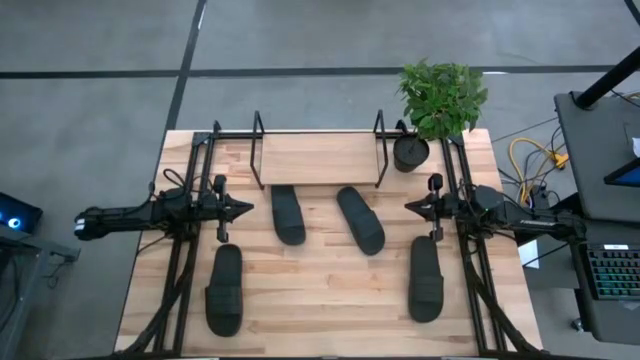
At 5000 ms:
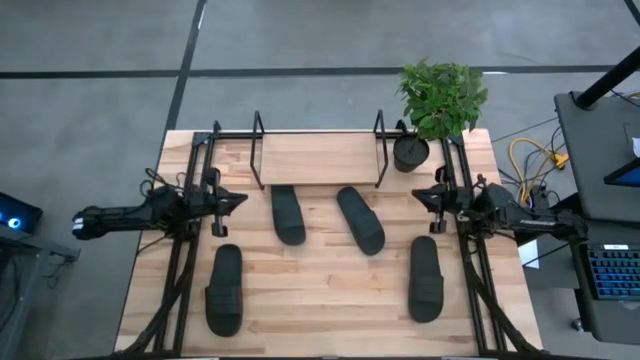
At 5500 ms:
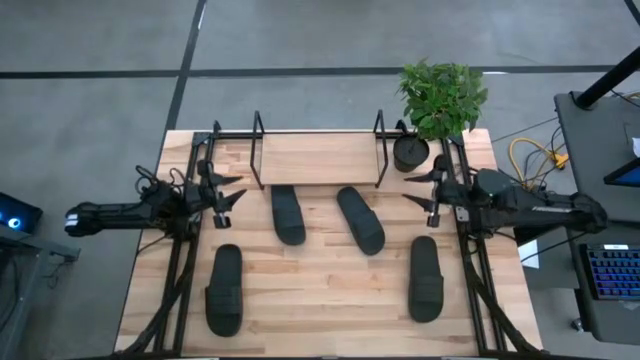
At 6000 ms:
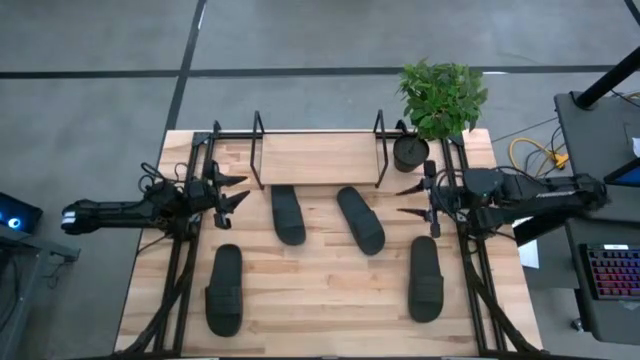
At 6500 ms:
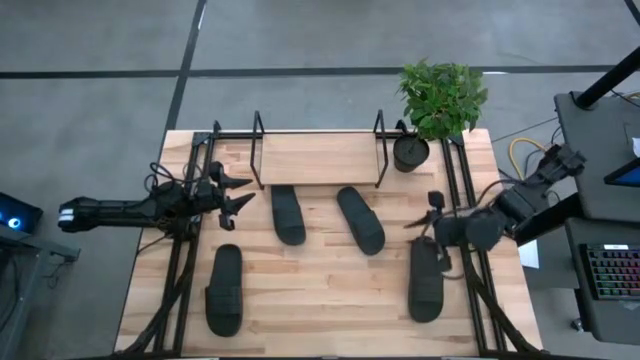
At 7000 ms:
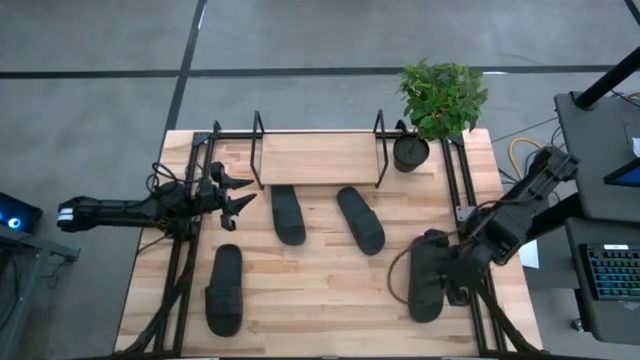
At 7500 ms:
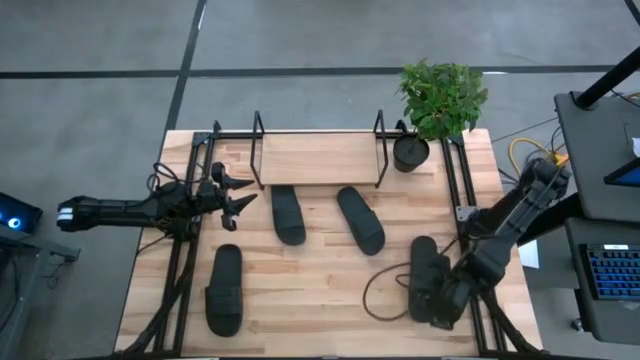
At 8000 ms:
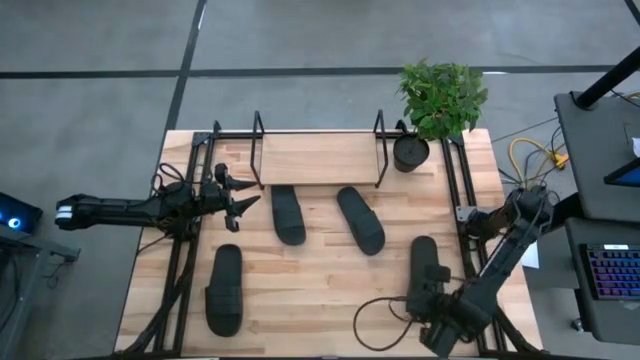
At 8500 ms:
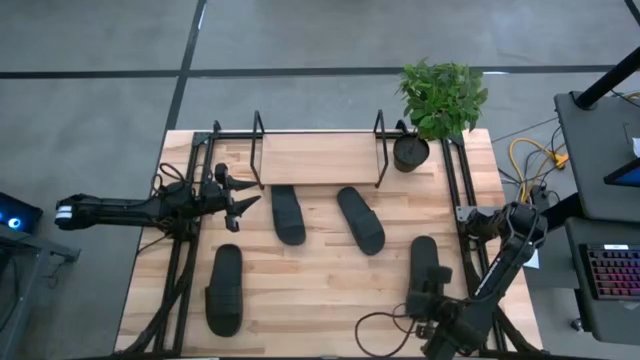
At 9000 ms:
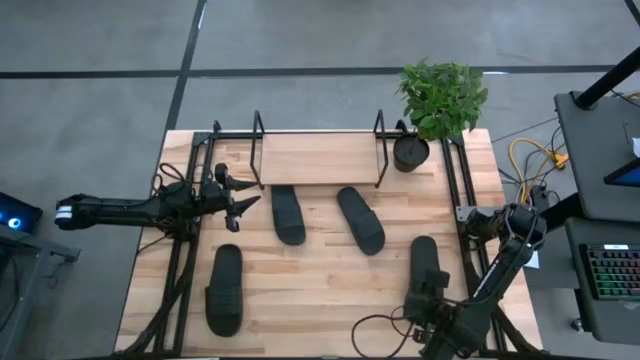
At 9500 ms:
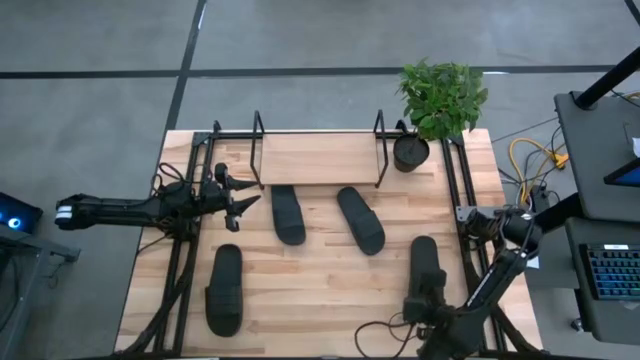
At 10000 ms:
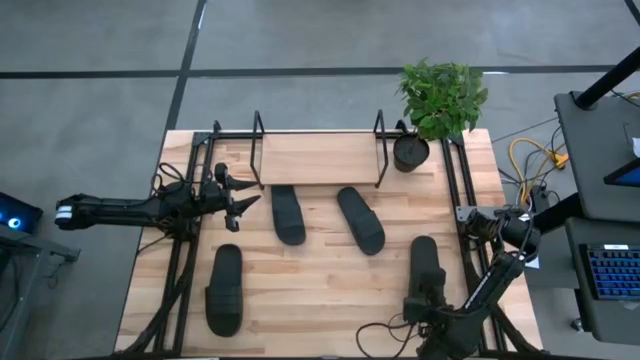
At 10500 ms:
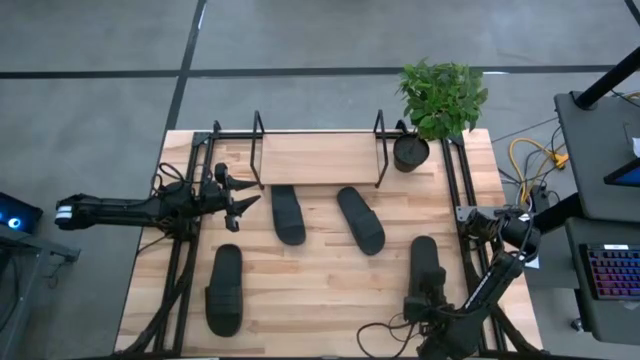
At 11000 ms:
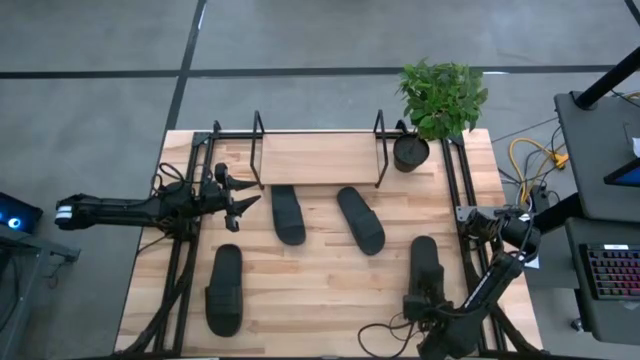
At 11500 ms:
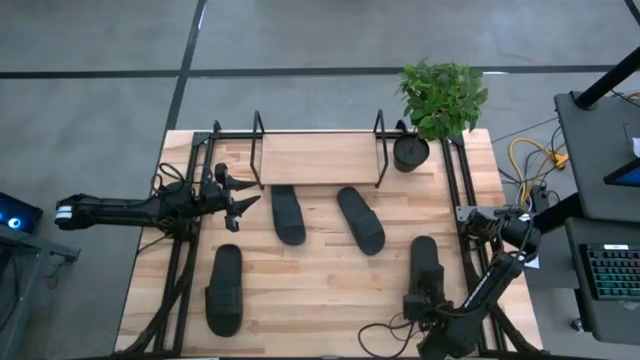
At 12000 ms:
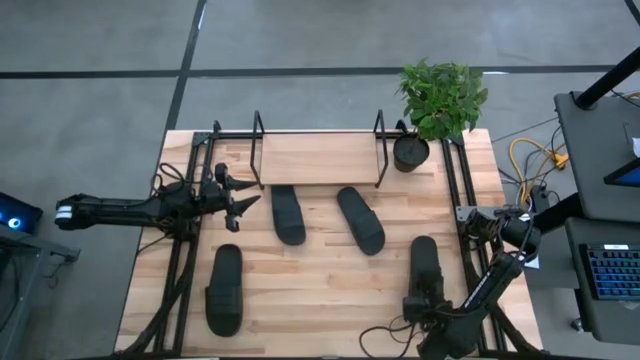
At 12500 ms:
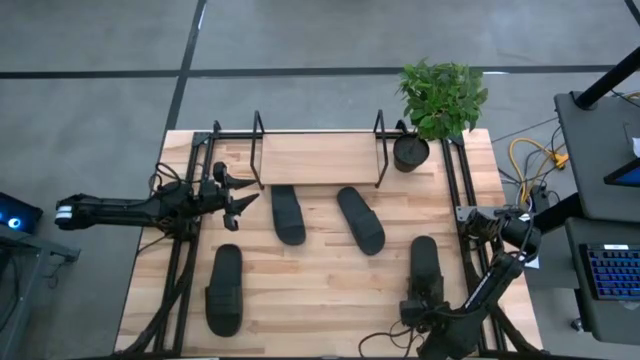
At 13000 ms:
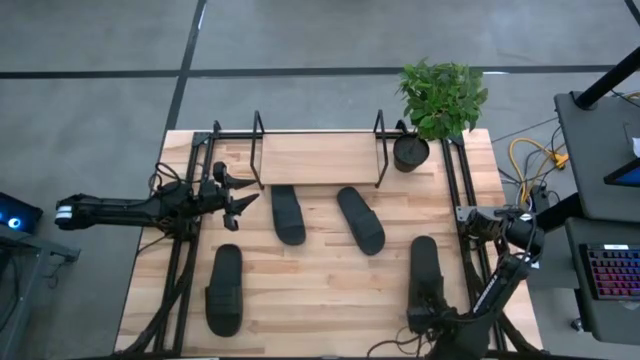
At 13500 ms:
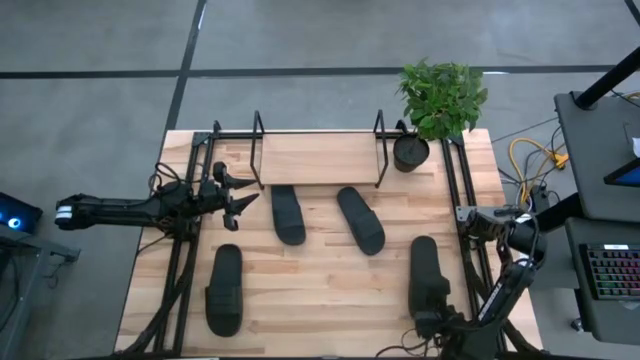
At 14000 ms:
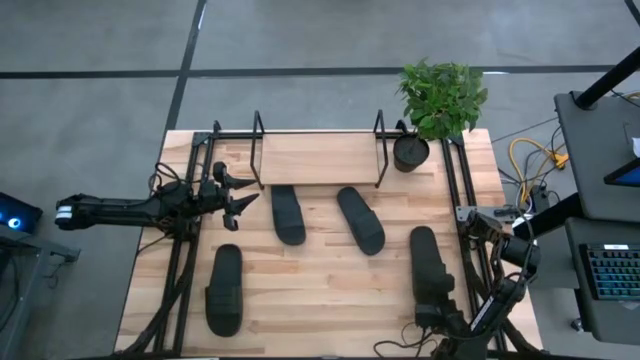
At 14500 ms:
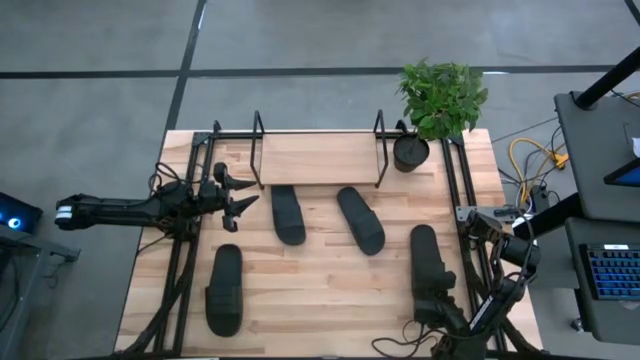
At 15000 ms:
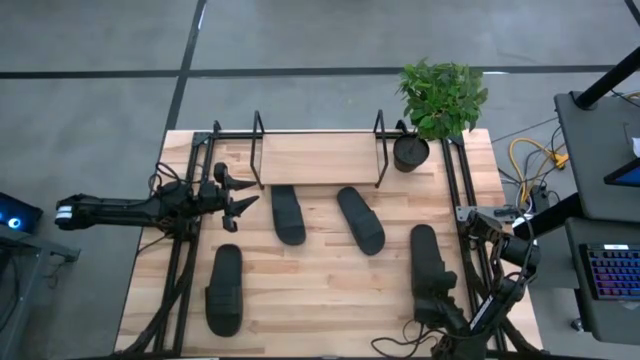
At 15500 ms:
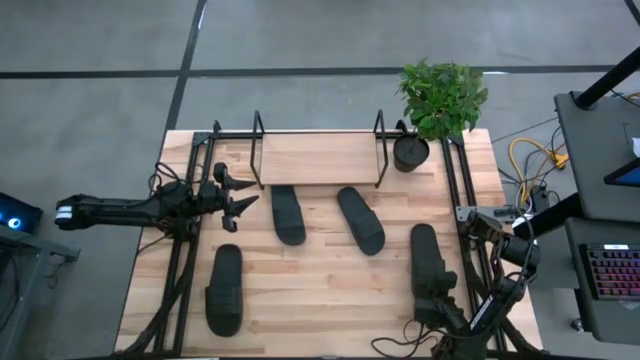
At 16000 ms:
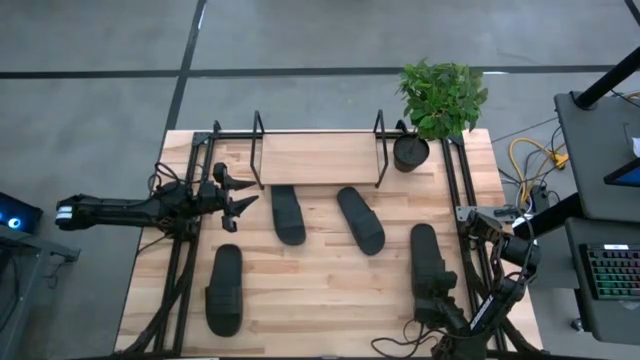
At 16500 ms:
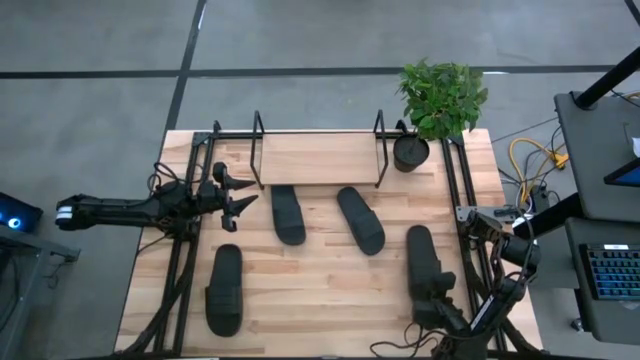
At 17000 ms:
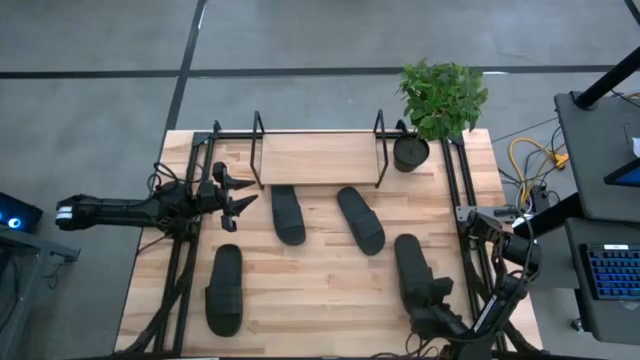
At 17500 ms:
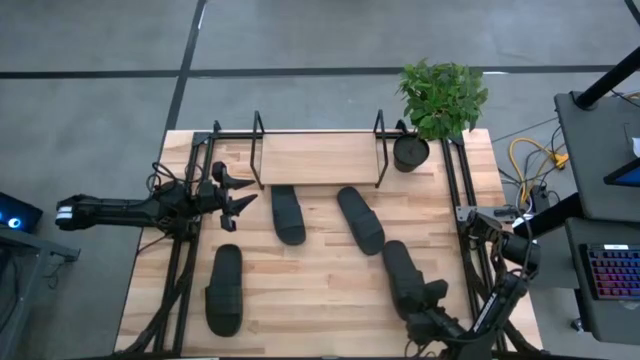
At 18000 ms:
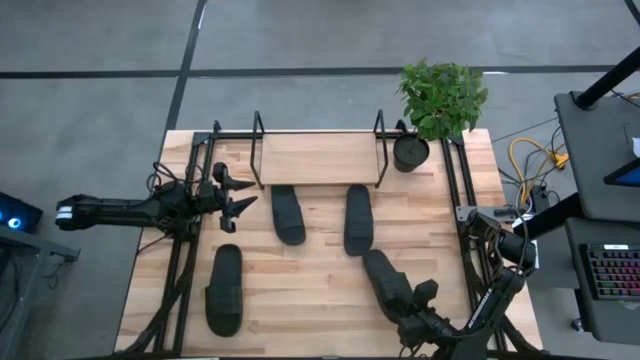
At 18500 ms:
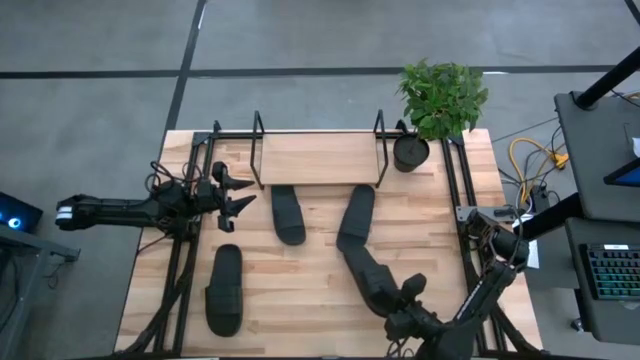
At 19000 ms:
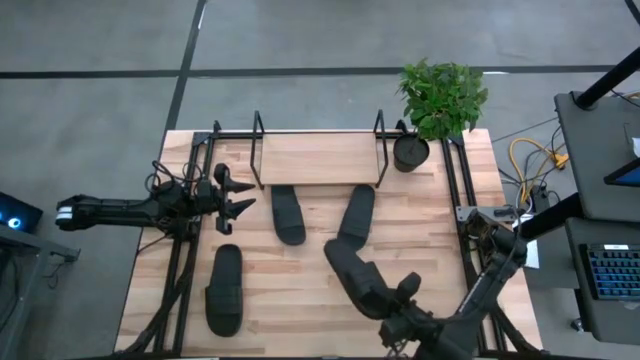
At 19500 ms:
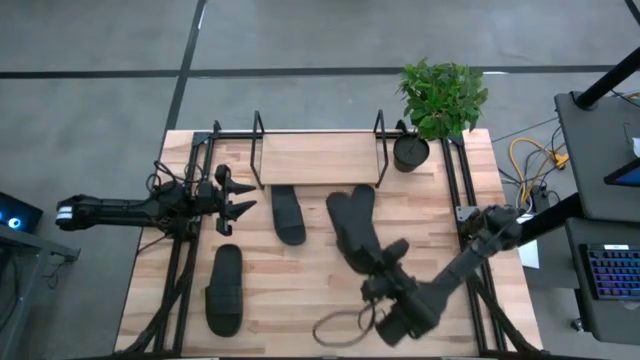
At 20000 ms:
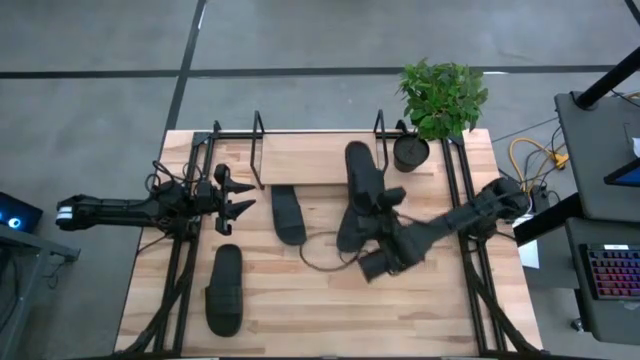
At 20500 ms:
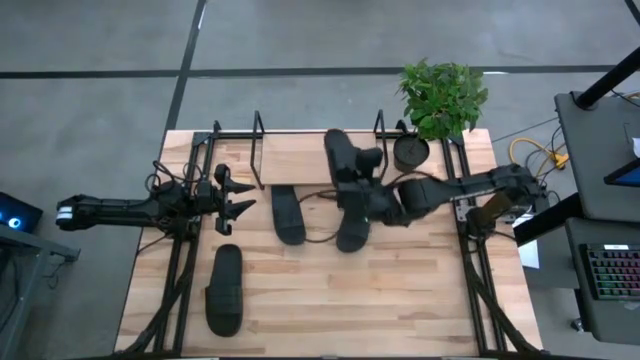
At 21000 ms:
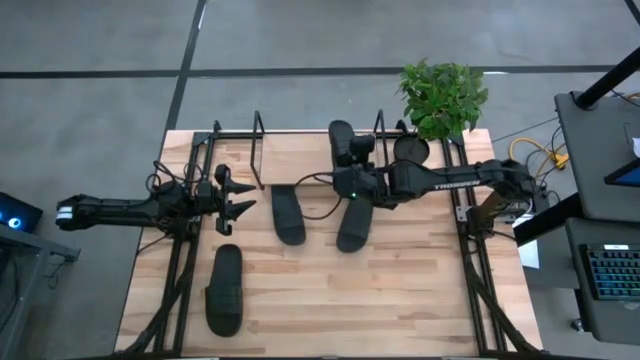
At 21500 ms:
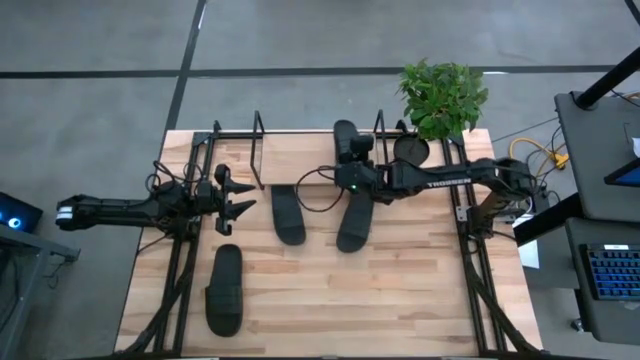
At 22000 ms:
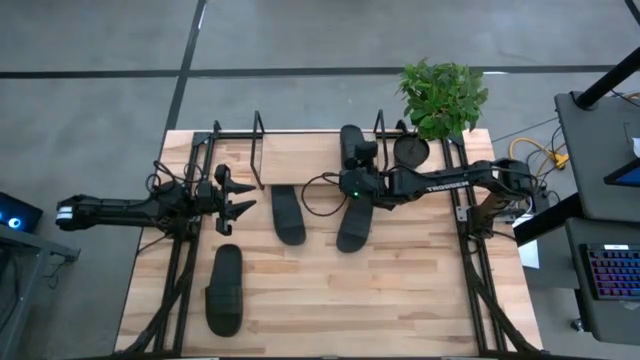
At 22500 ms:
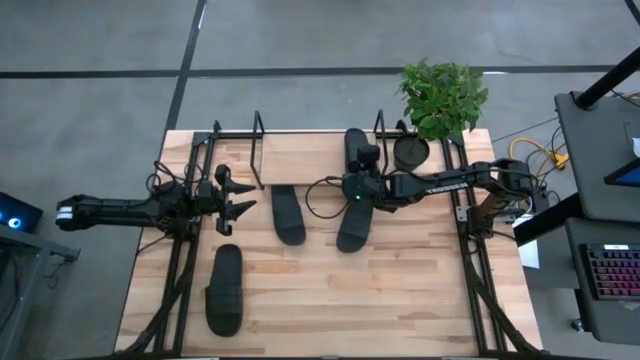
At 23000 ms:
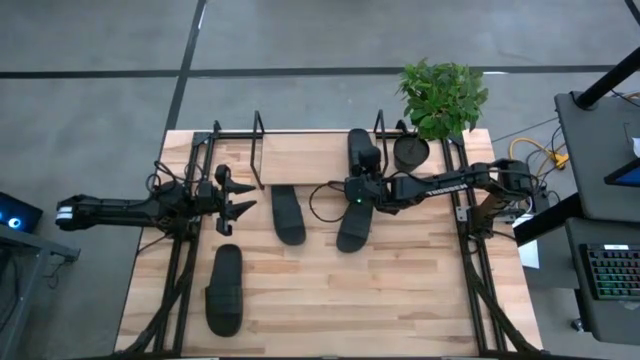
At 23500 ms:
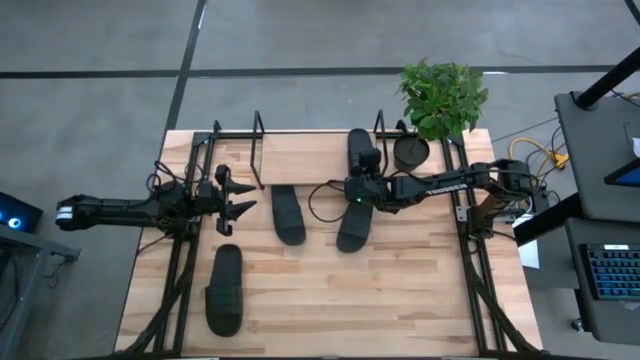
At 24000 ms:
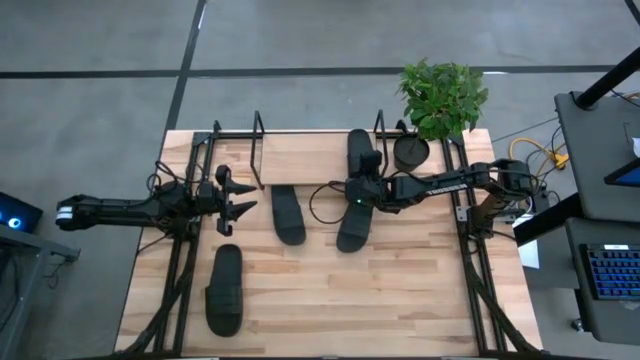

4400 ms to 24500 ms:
Task: Pick and place slides into the shelf
Put the bottom right black slides on the shelf
